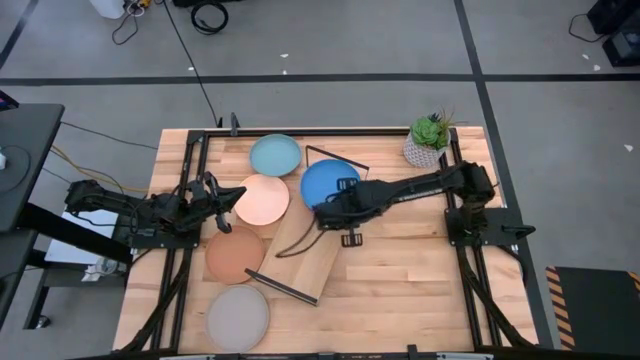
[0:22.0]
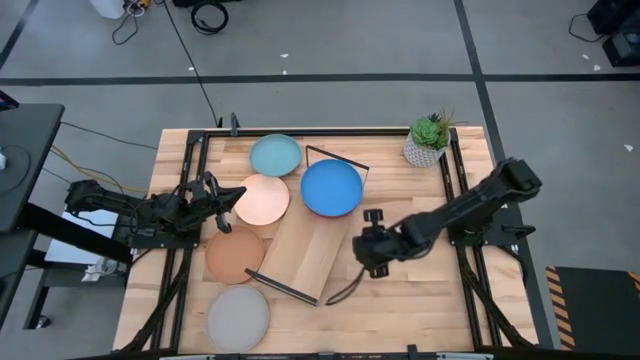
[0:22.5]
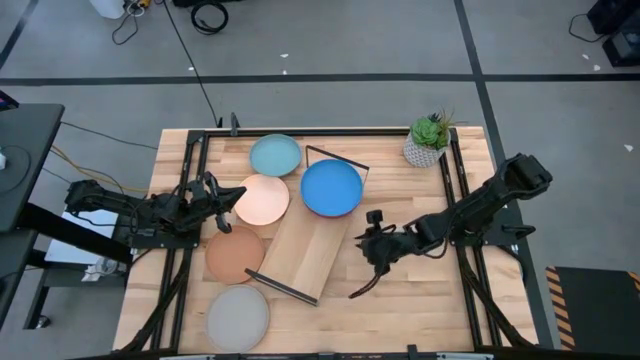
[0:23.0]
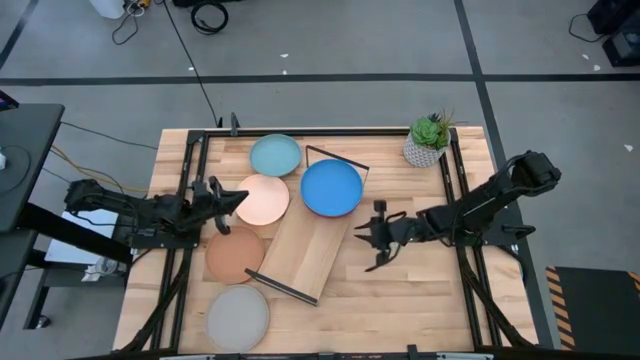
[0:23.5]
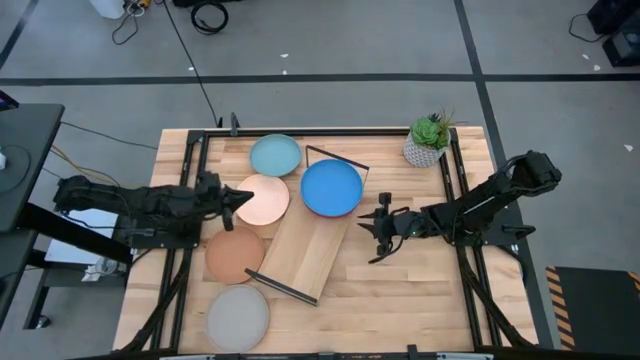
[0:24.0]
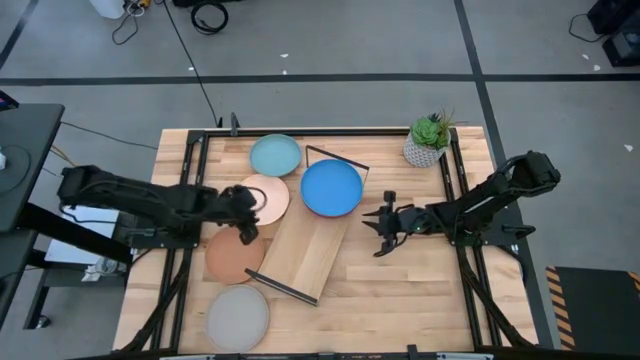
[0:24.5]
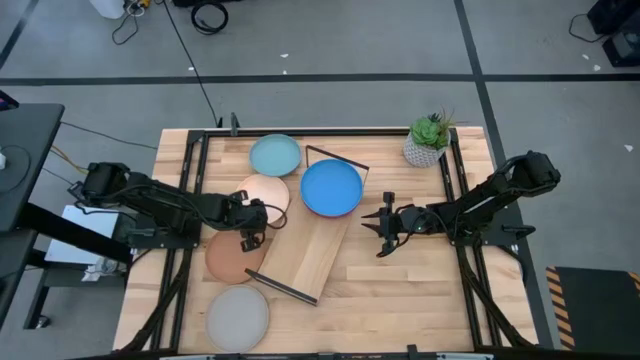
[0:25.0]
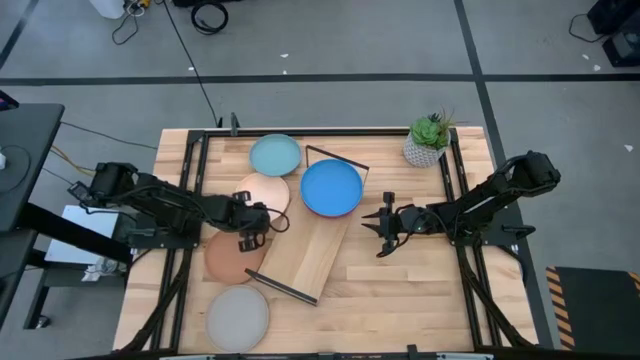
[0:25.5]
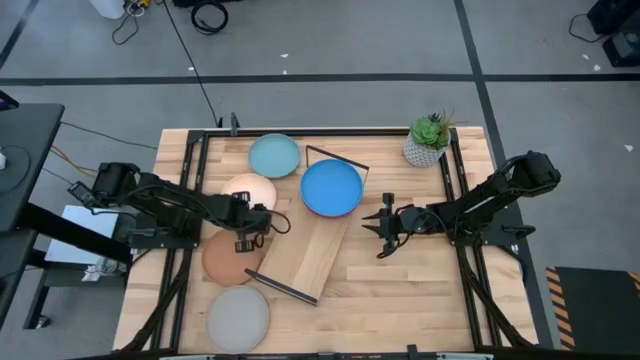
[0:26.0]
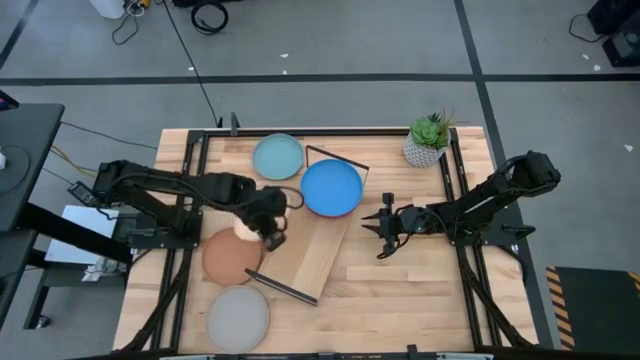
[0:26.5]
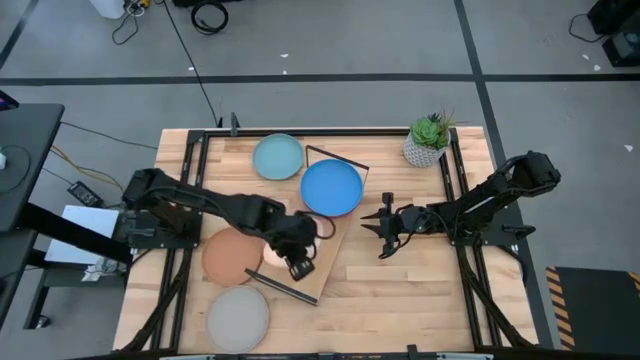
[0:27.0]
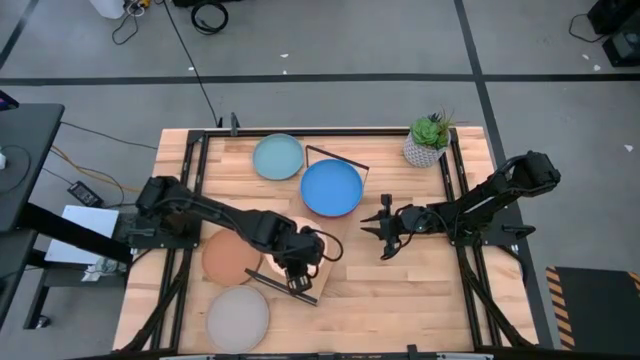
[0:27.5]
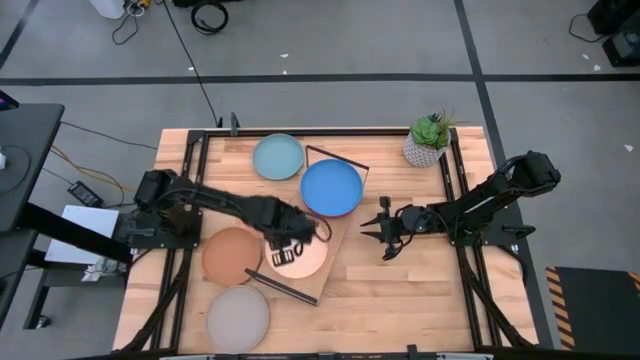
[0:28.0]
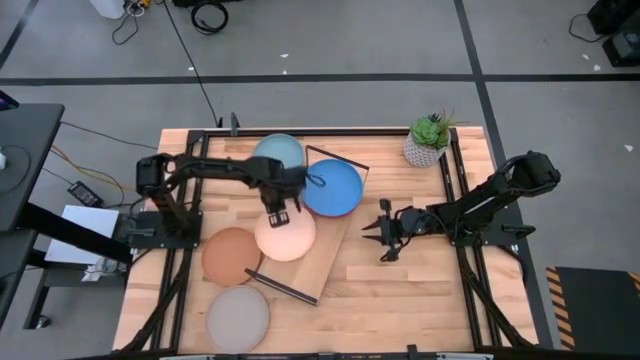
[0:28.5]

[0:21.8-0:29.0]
Task: Place and stack plates onto a shelf
Put the light brown plate on the shelf

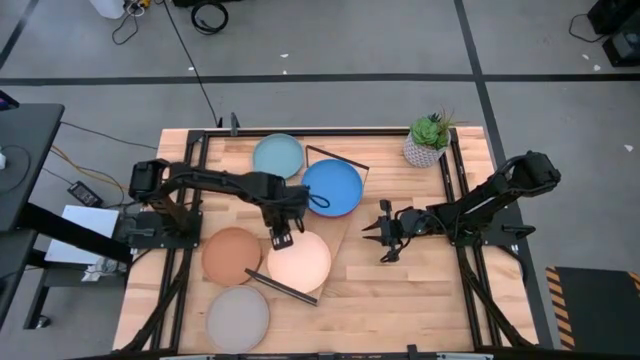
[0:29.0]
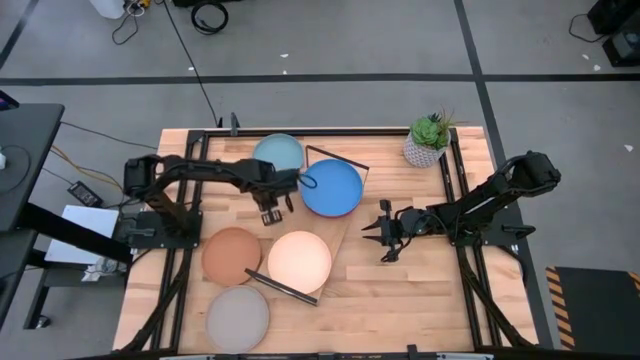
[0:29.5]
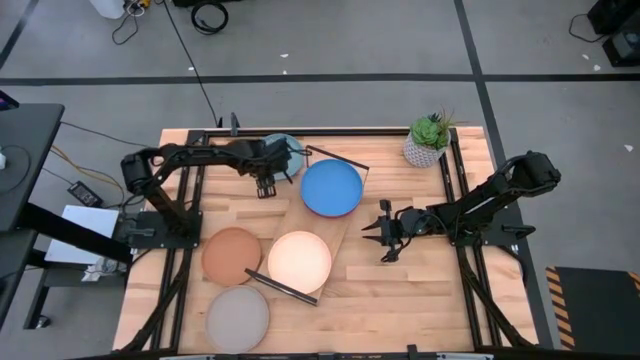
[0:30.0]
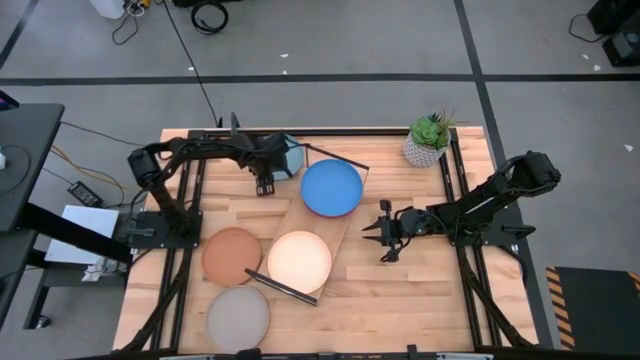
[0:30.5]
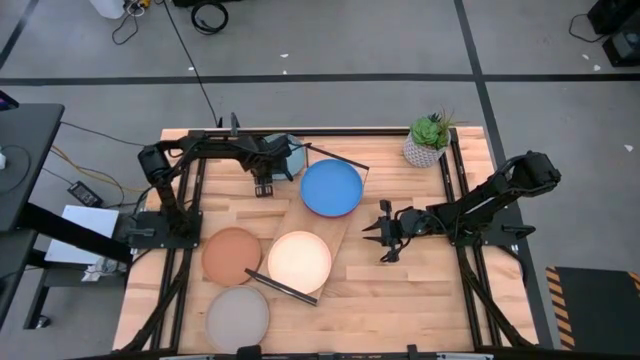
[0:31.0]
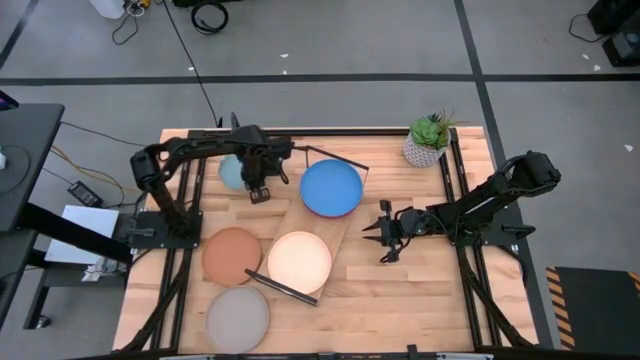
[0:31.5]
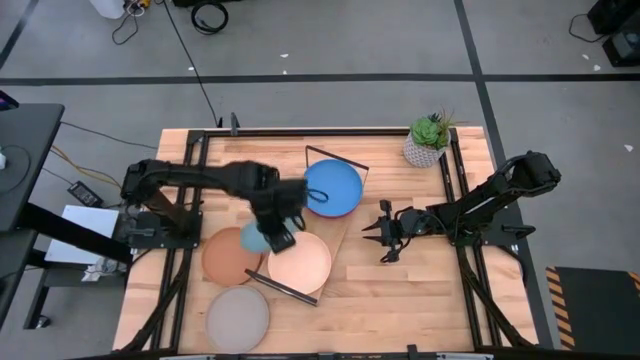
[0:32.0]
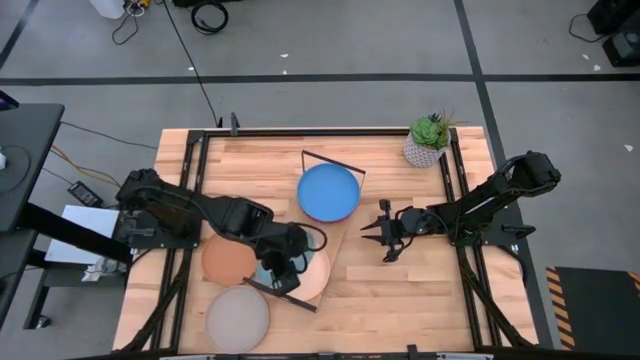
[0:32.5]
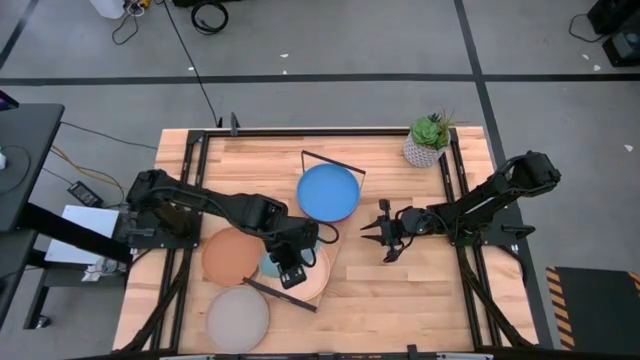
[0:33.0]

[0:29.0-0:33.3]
Stack the light blue plate on top of the light brown plate on the shelf

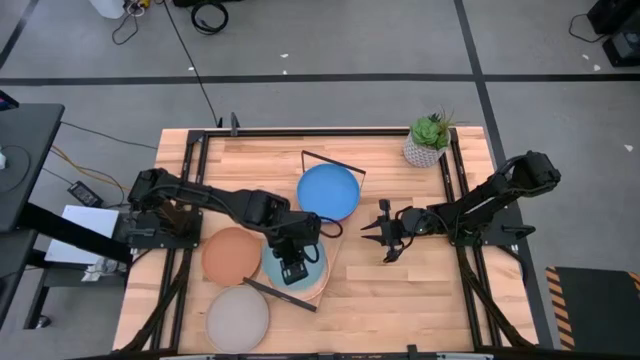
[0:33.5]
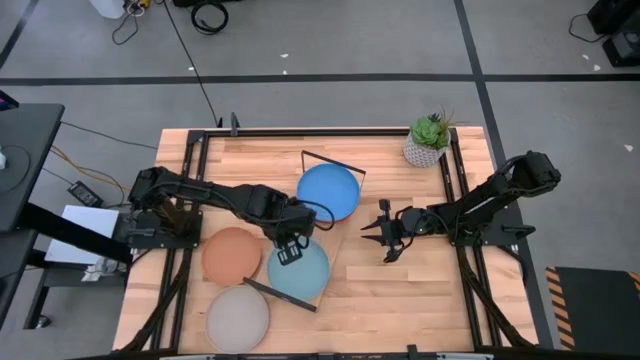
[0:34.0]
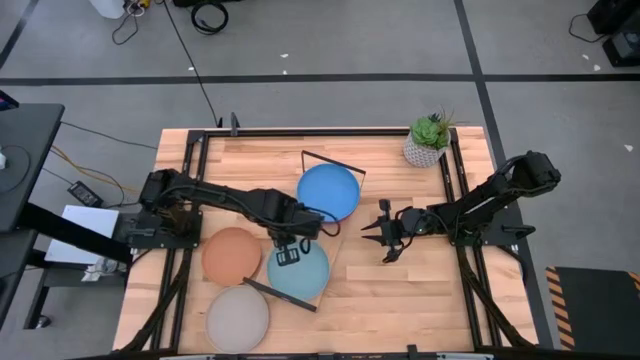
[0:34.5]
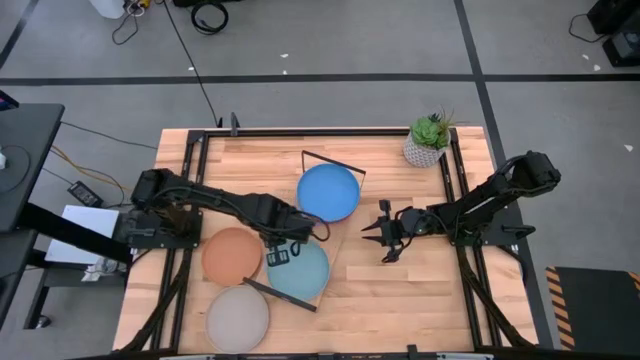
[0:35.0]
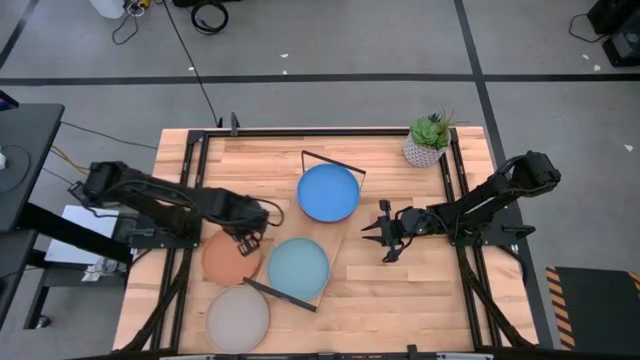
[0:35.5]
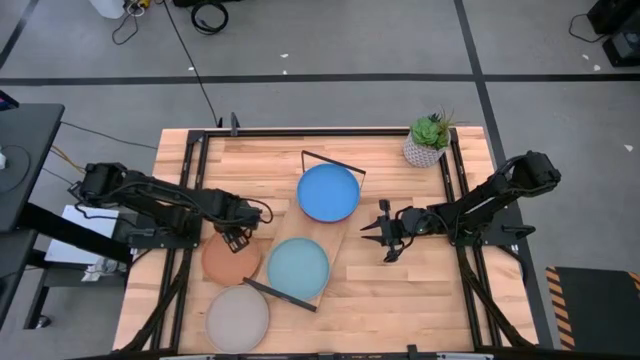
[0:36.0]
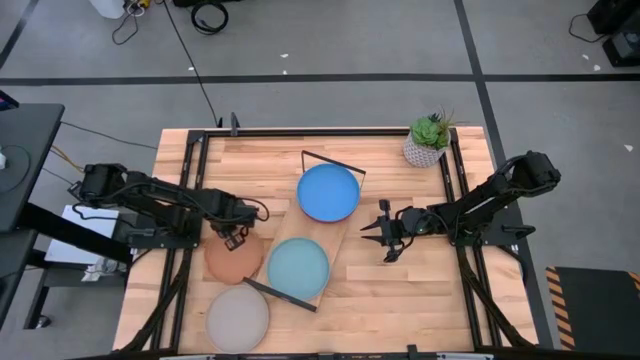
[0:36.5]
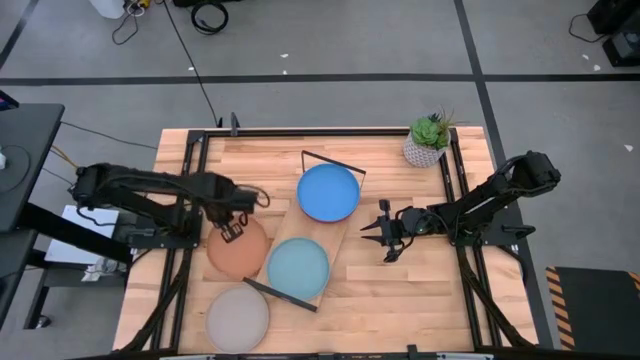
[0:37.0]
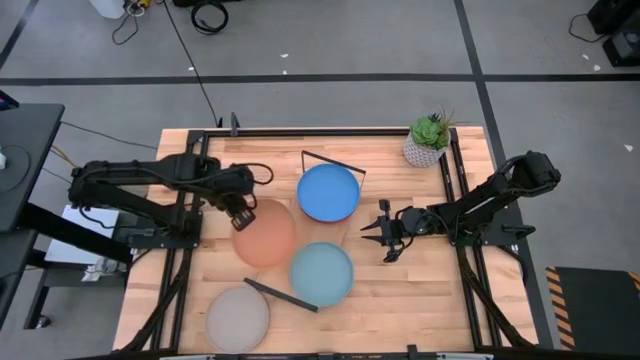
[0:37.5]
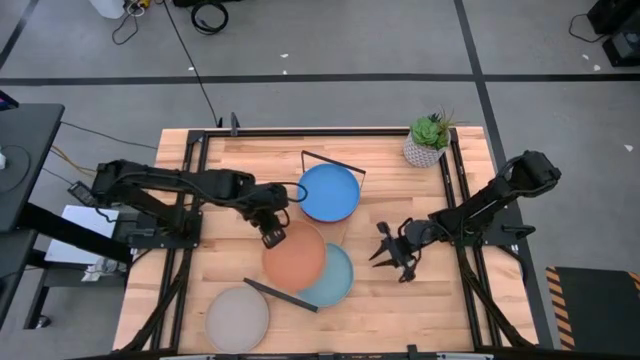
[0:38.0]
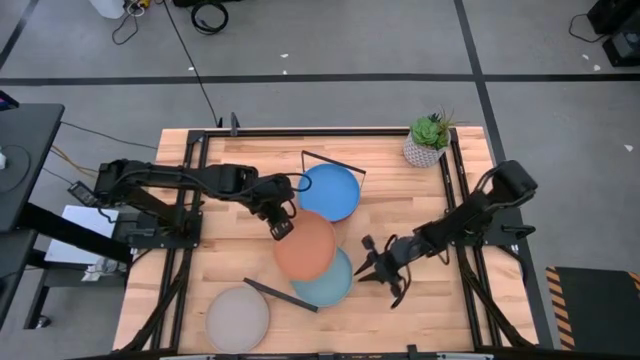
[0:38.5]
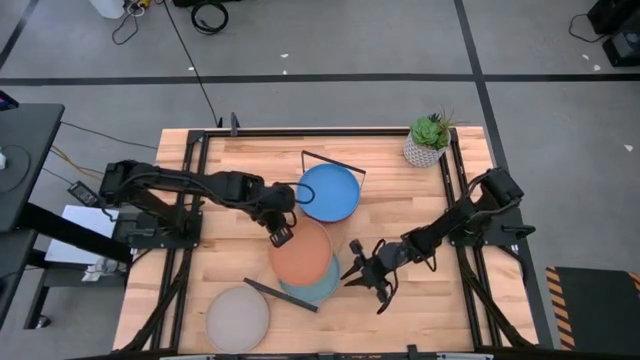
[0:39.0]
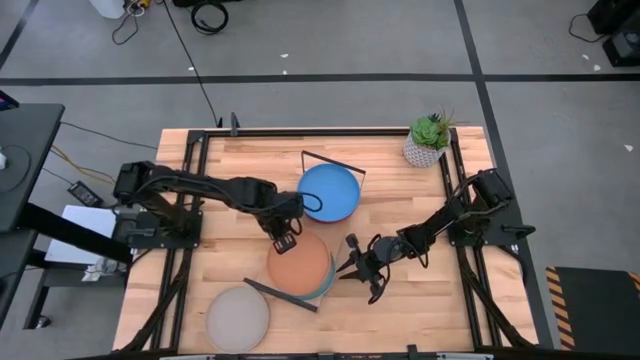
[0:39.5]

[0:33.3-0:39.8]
Stack the brown plate on top of the light blue plate on the shelf

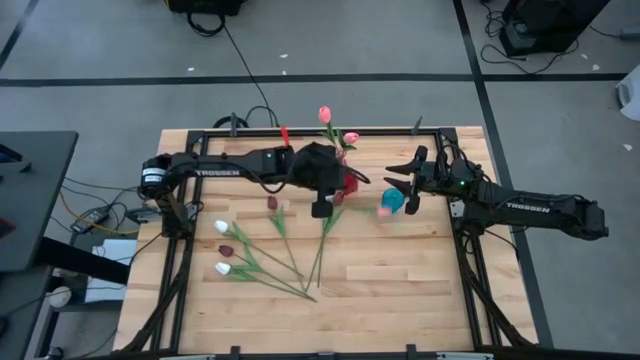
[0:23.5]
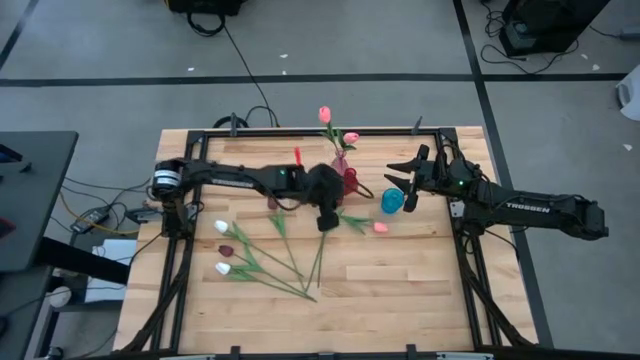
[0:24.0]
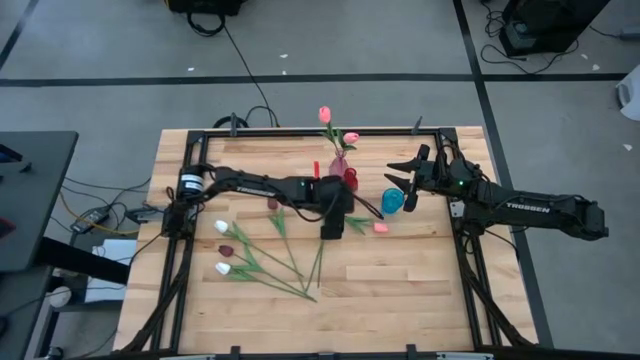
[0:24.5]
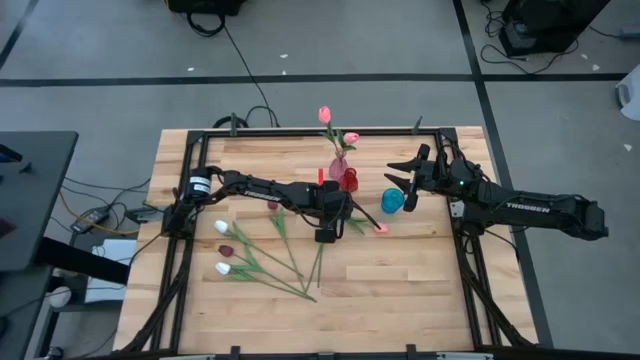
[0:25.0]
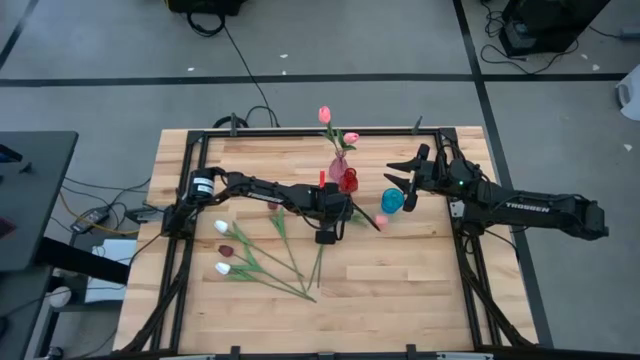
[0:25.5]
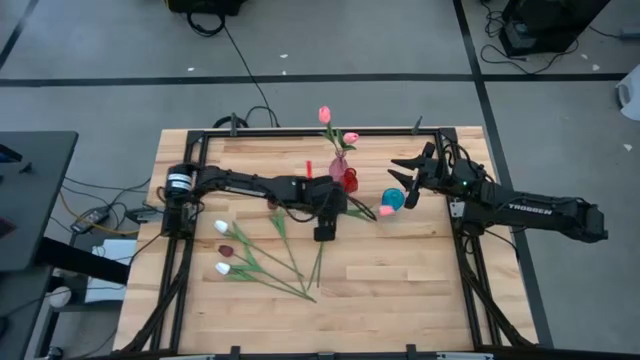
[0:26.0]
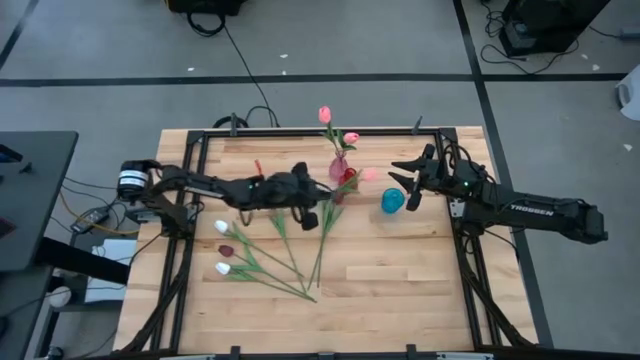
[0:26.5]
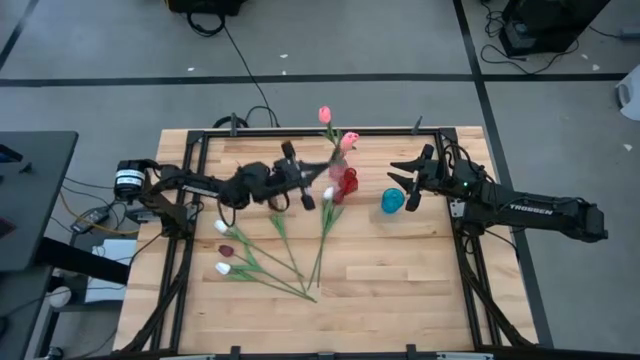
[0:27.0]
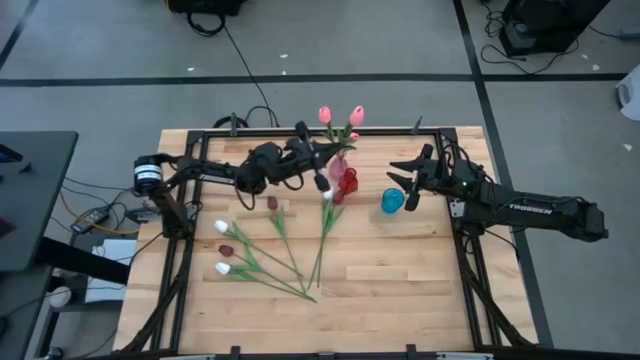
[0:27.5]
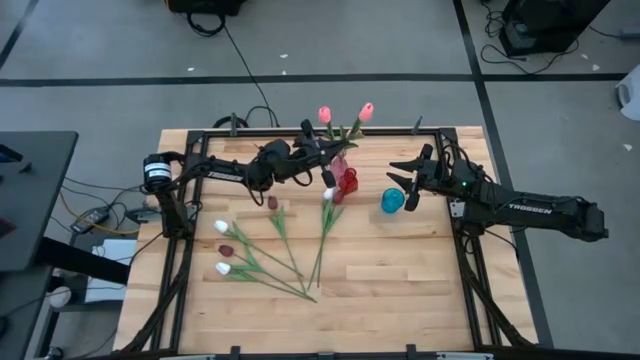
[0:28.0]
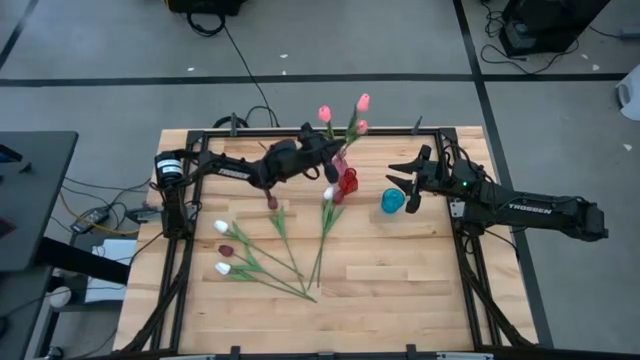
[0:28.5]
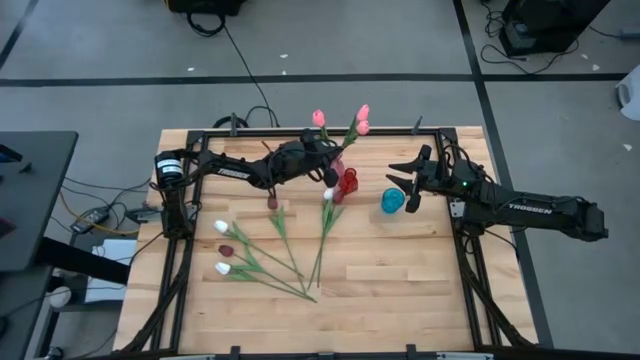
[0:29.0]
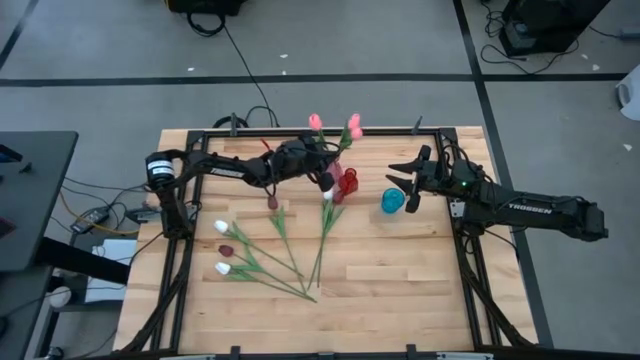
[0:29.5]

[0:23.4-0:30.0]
Task: Sort flowers into vase by color
Put the pink flower into the pink vase
